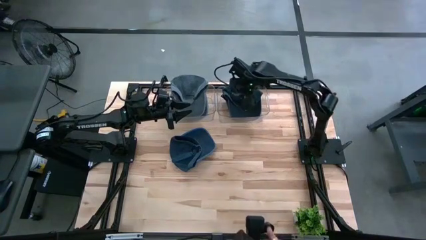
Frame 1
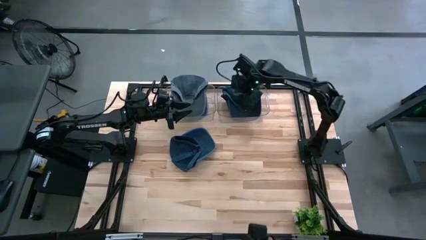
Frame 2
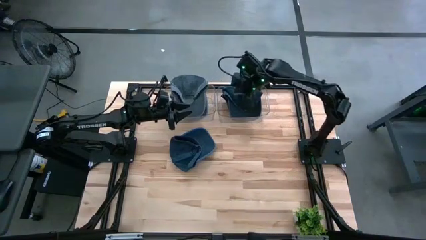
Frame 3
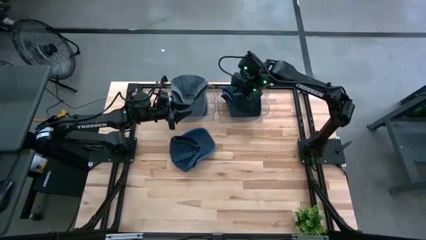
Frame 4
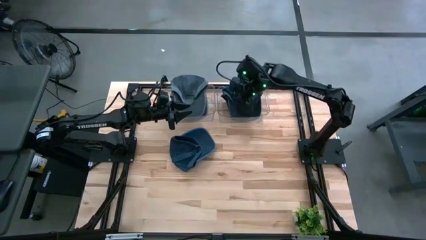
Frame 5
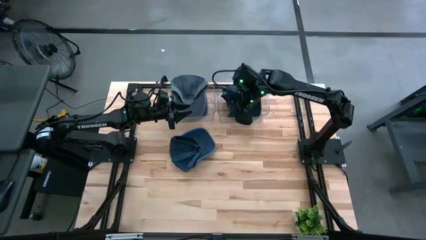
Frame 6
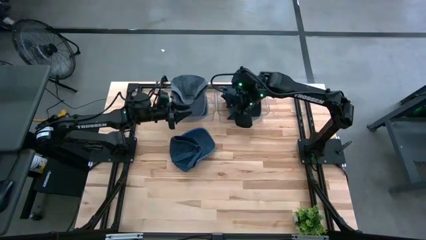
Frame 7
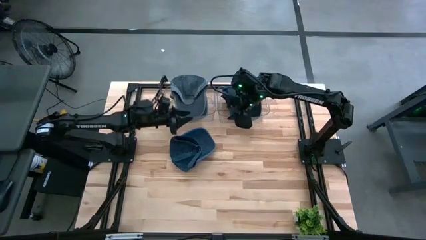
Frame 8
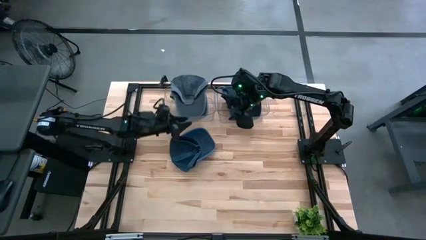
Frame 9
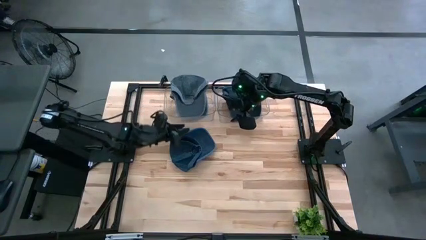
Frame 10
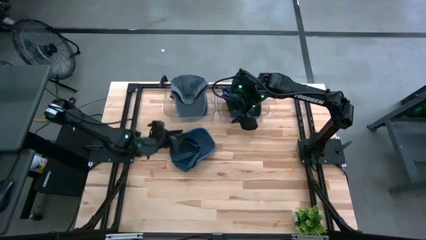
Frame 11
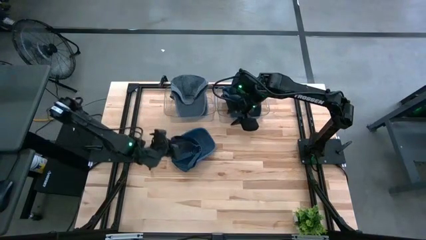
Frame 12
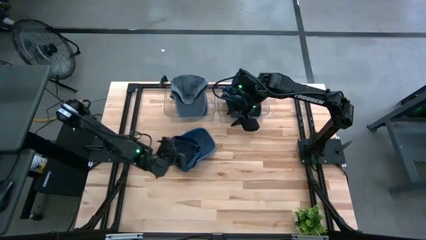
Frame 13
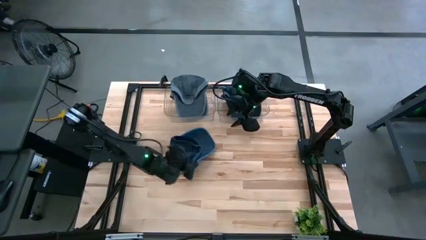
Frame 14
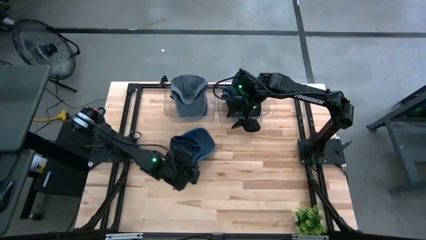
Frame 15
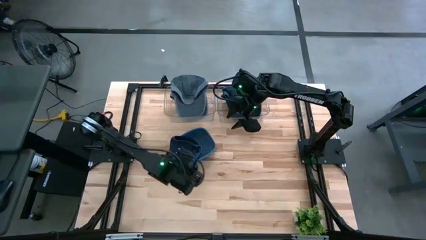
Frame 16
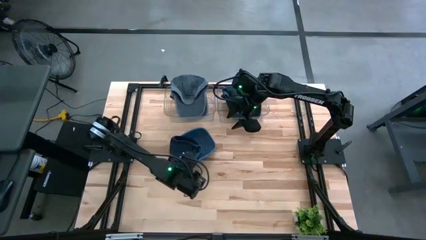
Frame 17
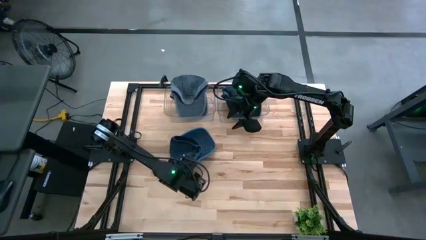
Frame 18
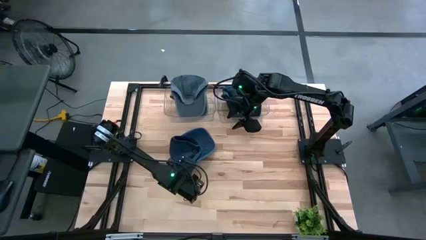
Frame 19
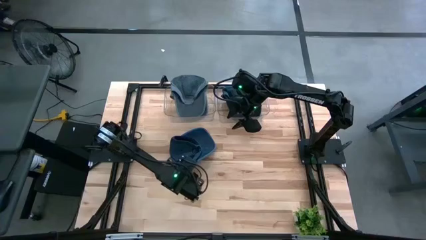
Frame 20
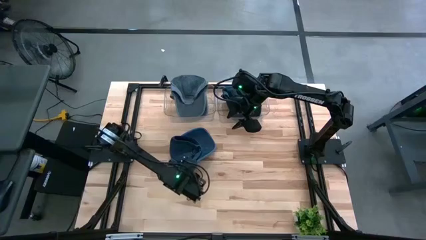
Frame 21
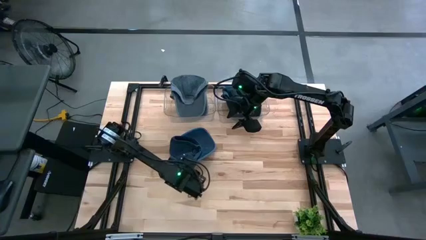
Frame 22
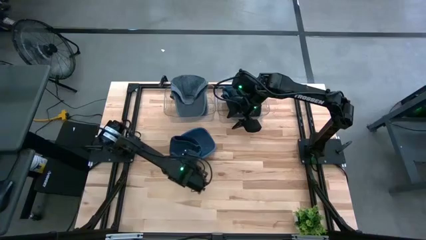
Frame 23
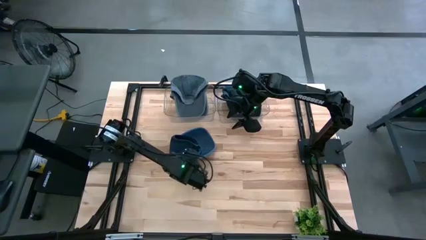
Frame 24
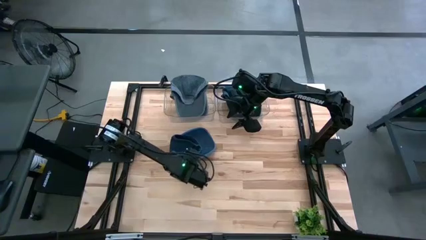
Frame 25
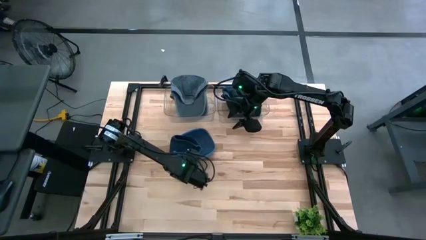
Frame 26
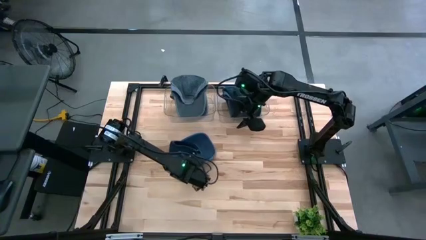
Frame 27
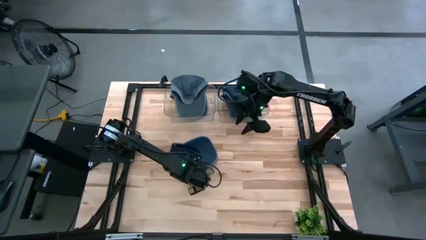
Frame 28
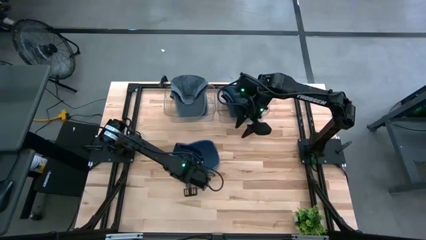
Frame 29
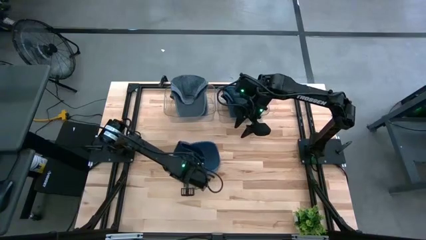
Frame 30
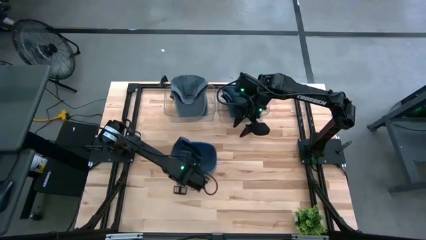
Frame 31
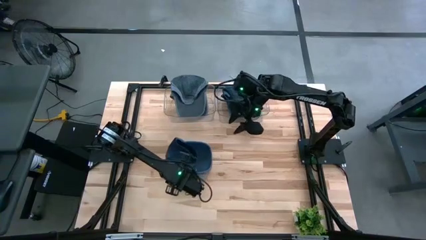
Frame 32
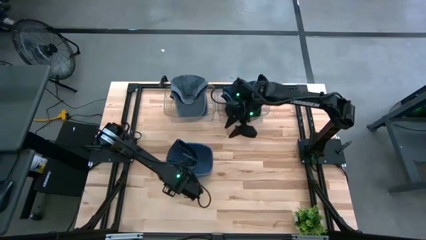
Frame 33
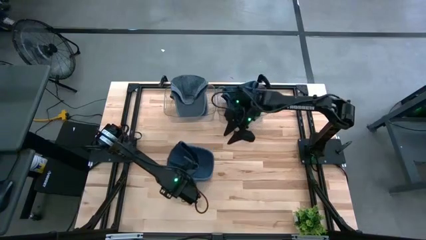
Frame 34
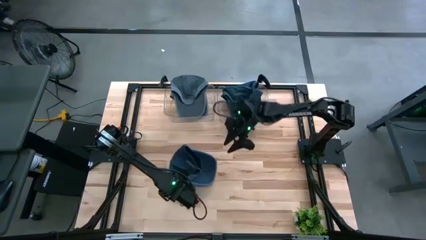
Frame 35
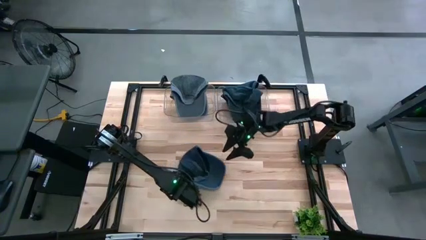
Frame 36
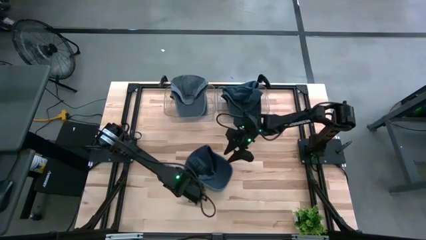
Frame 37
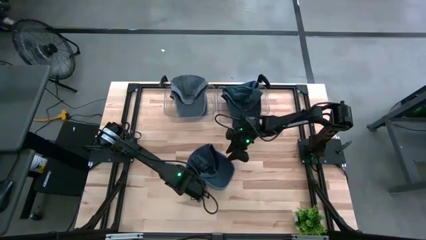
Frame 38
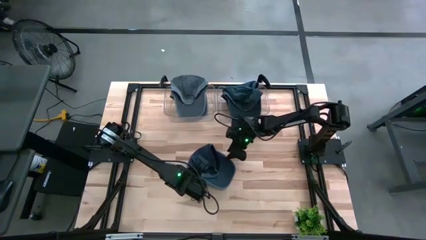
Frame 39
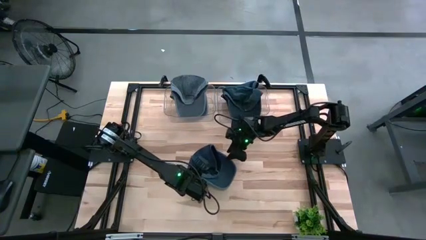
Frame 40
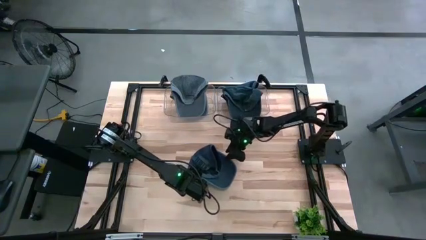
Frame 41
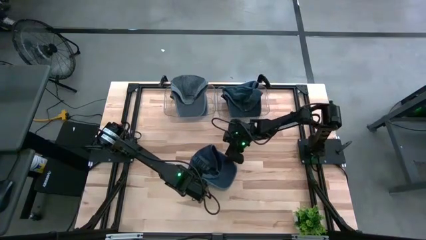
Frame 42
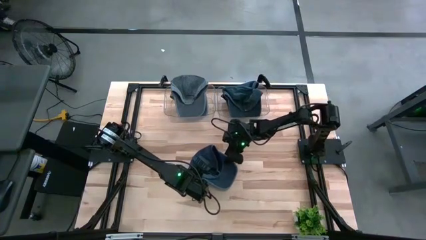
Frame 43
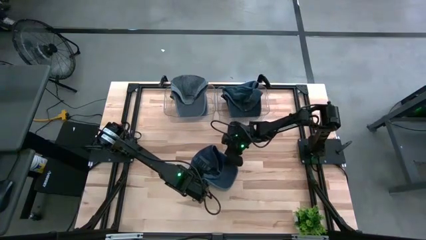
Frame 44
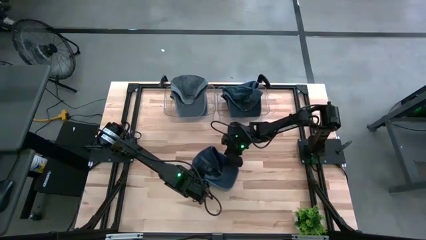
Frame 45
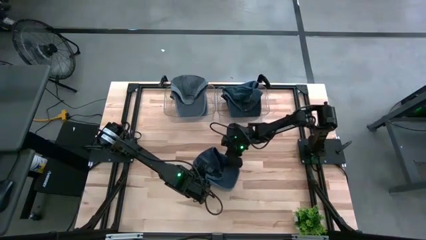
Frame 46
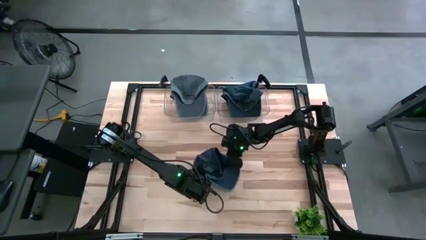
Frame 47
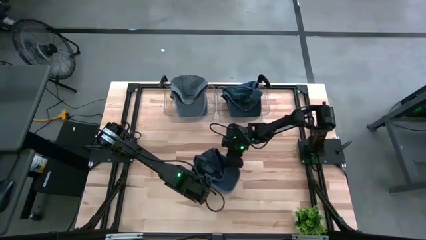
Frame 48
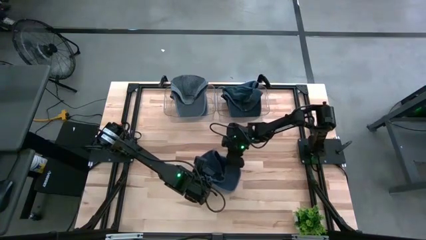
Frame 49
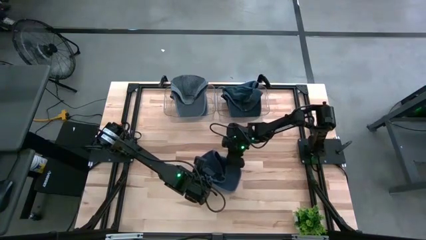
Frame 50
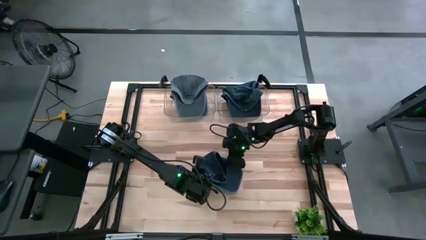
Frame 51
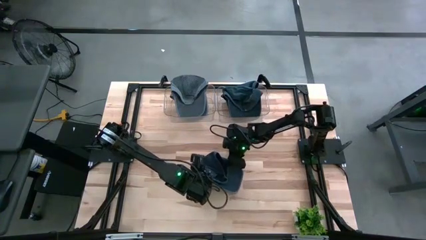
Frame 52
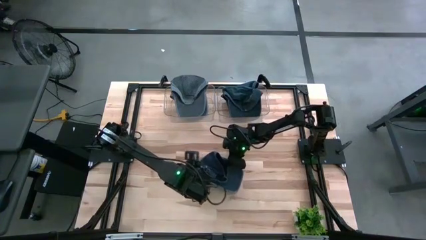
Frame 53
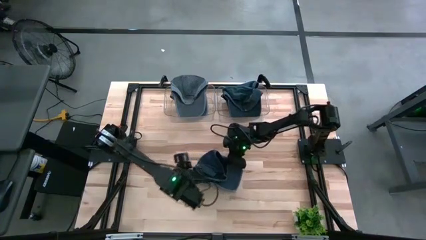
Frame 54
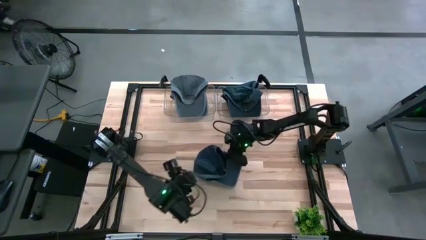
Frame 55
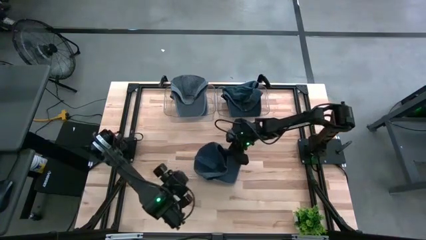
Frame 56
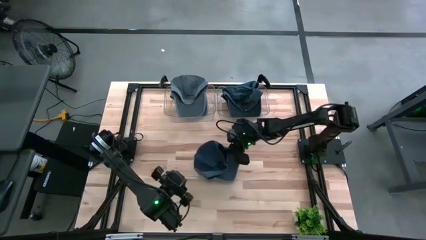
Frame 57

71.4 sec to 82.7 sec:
Task: Pick & Place hat
Put the dark blue cap into the right transparent bin
